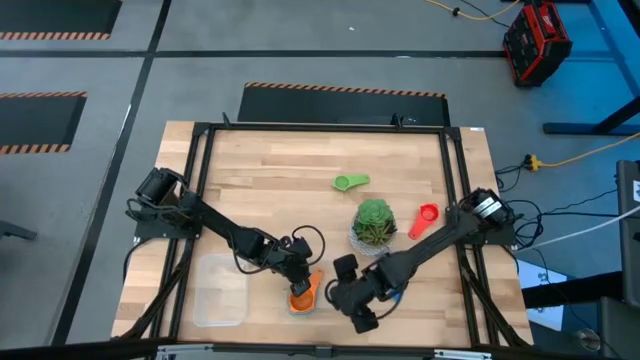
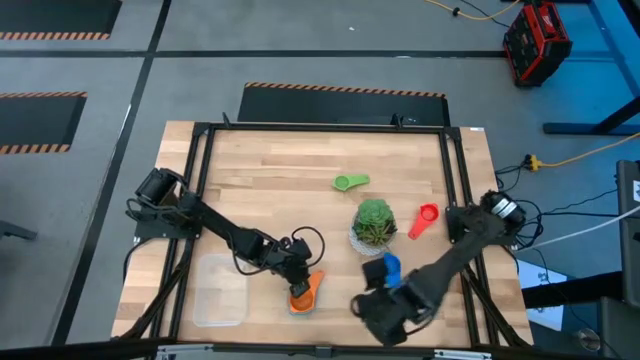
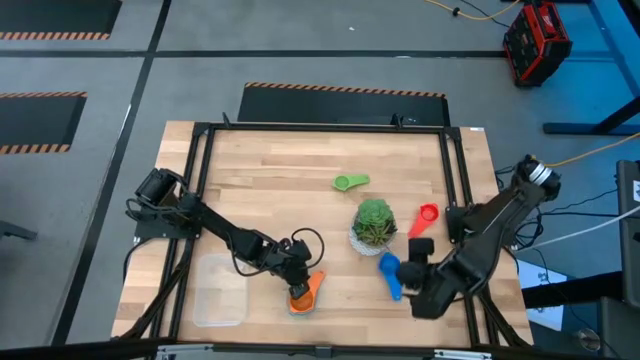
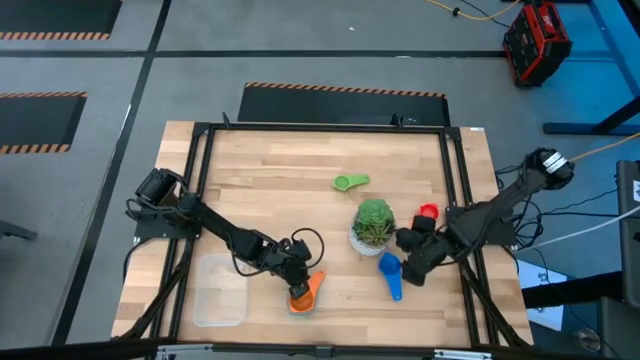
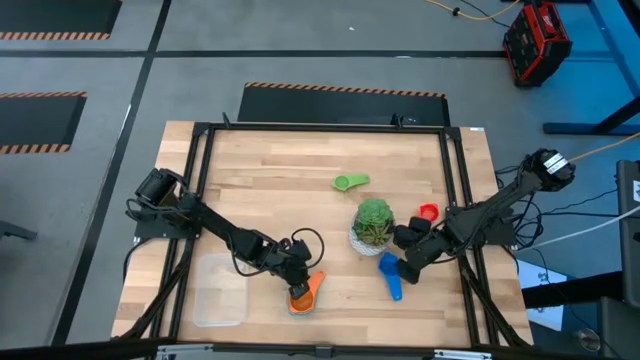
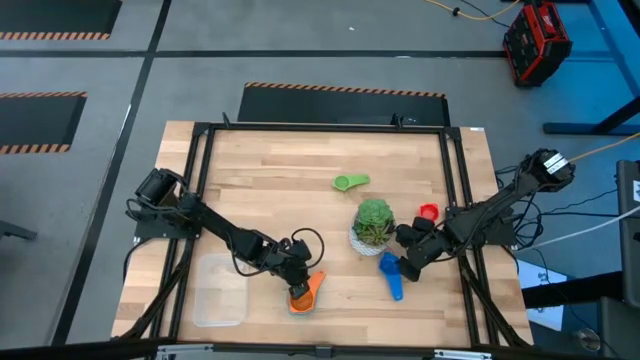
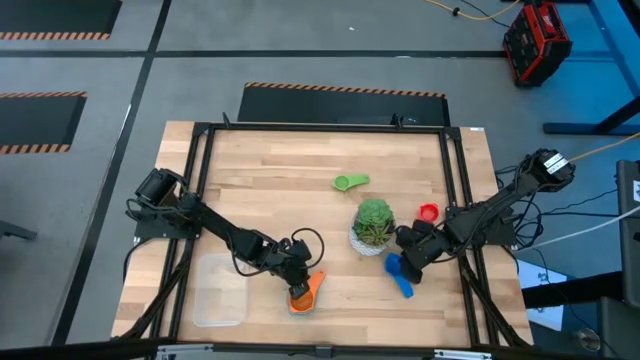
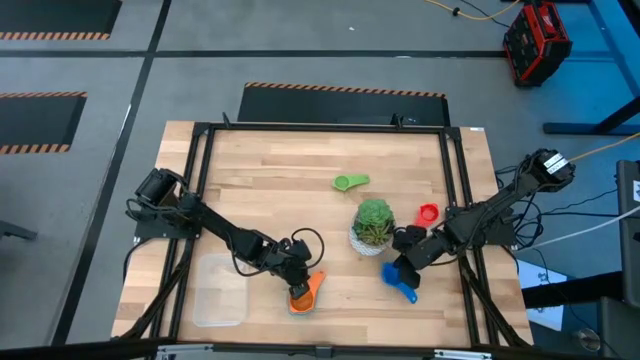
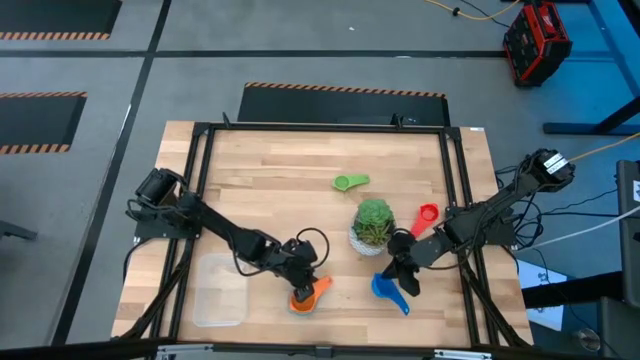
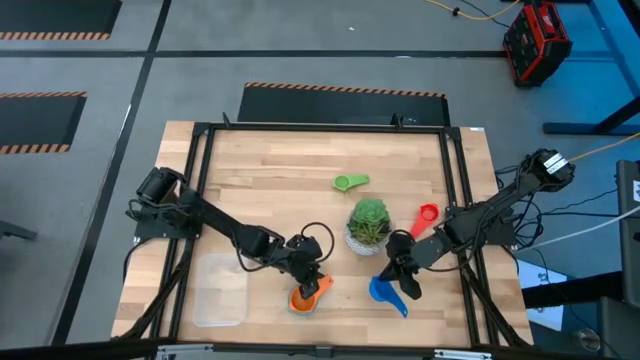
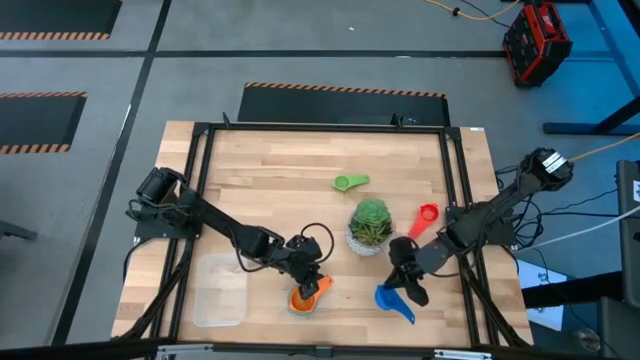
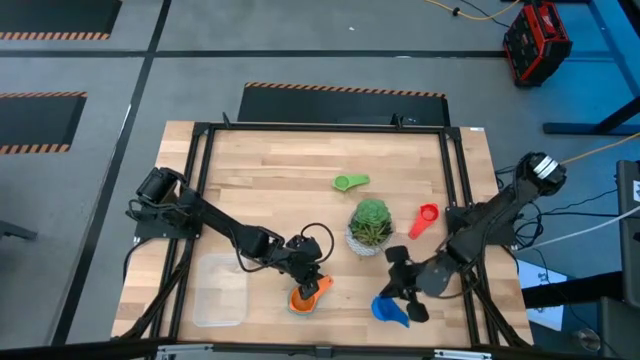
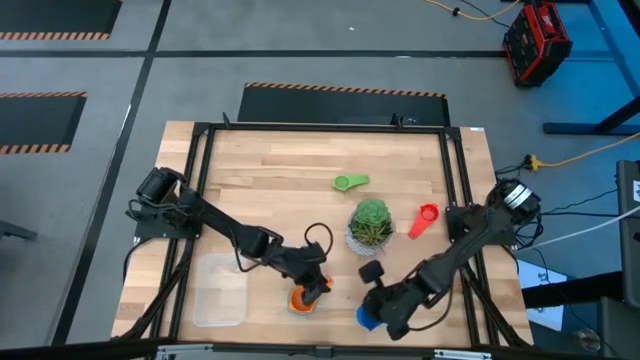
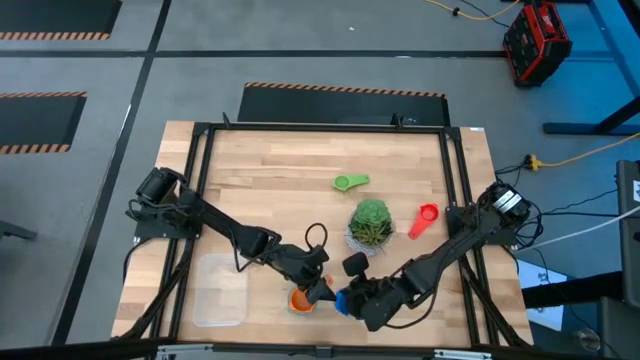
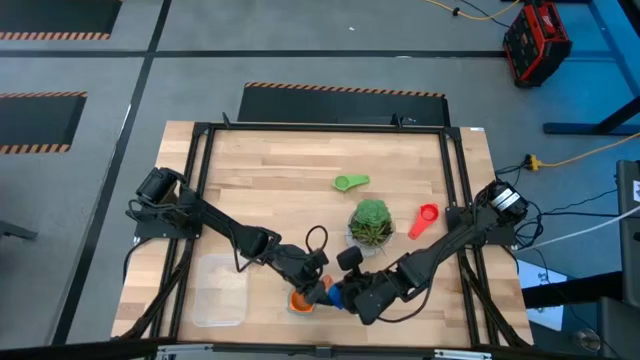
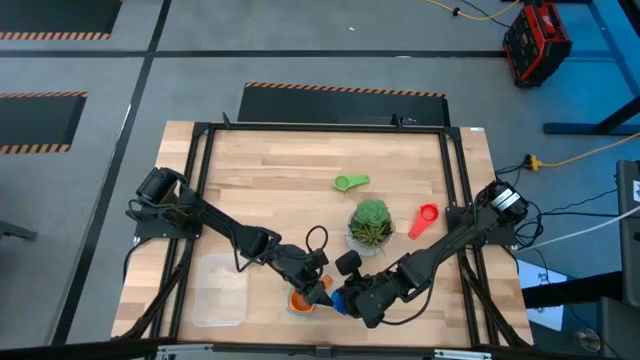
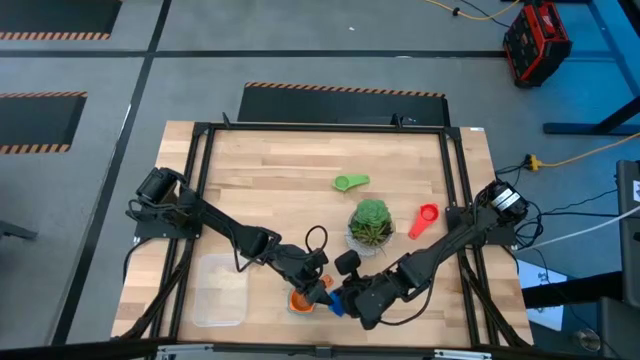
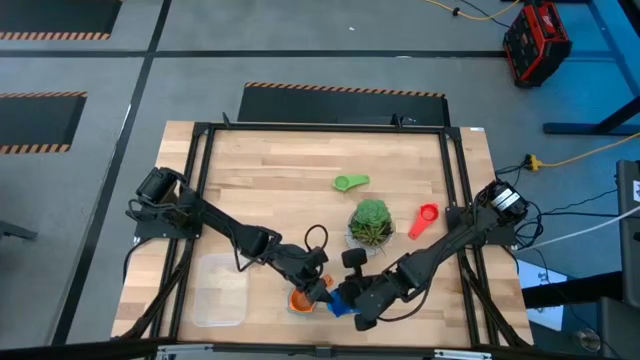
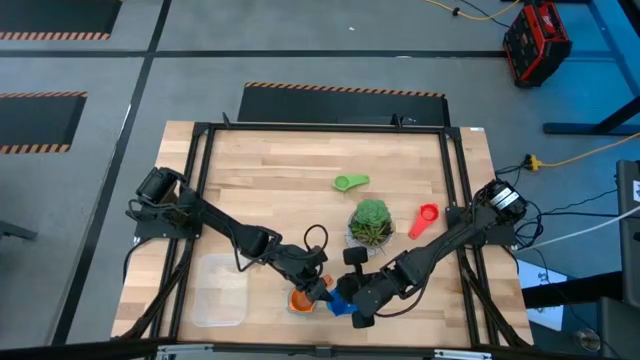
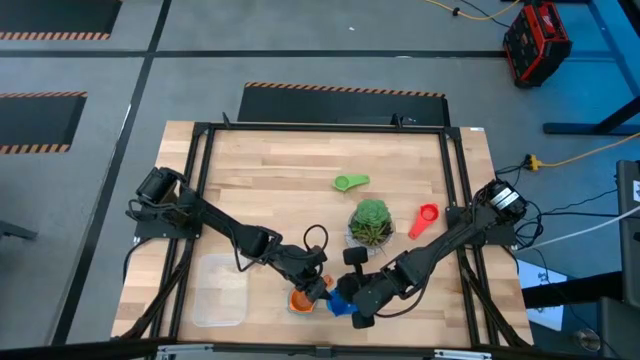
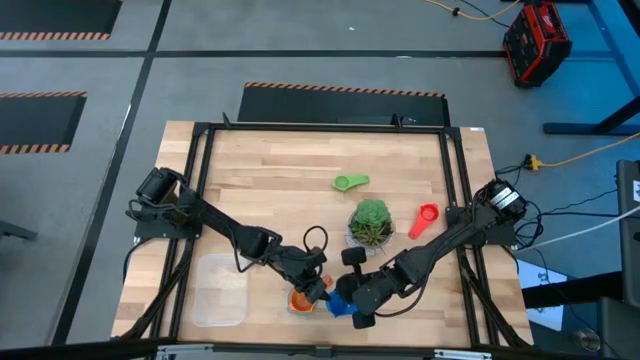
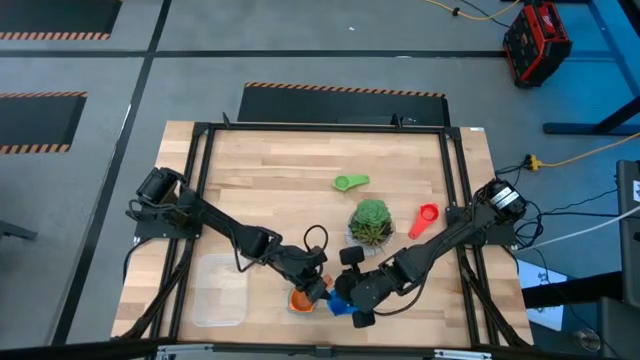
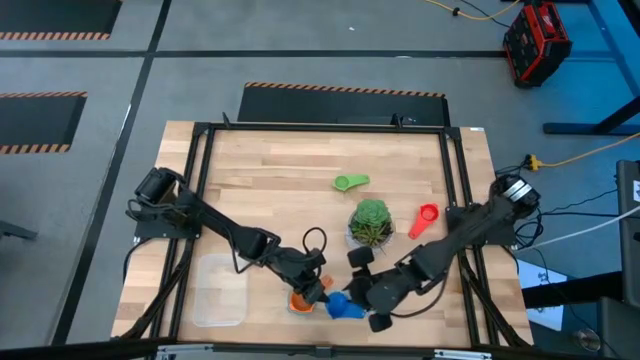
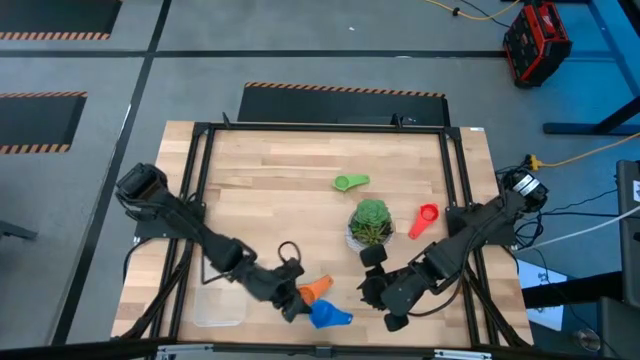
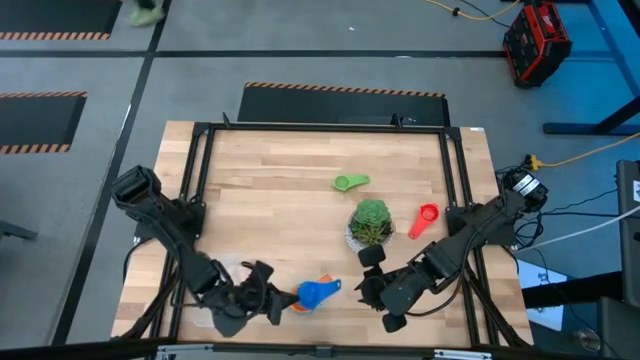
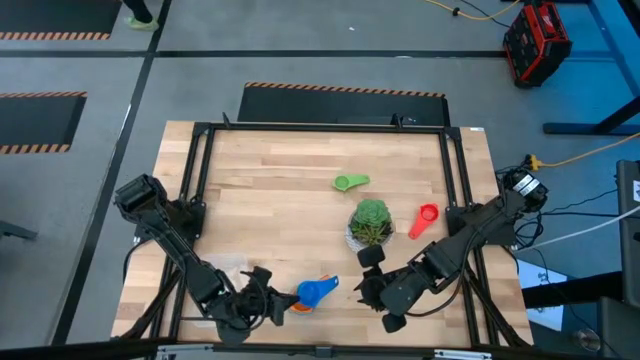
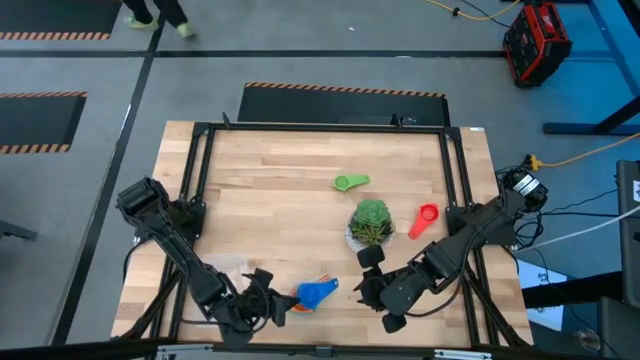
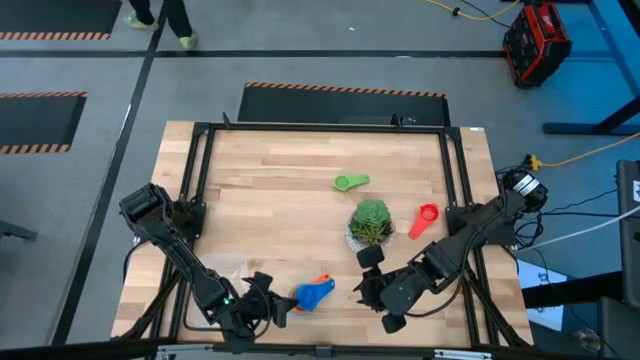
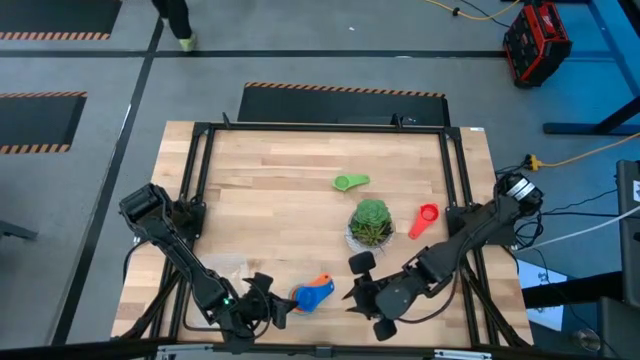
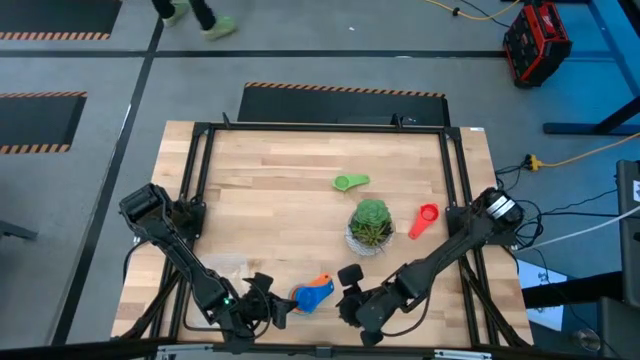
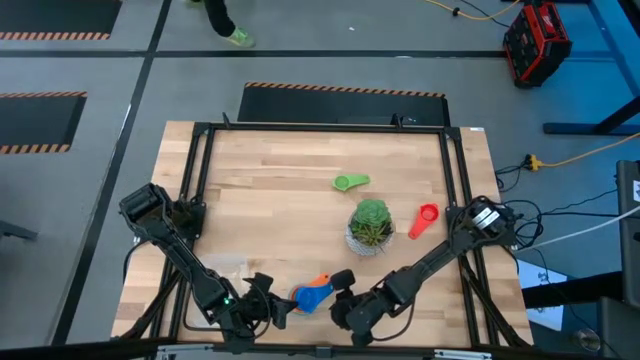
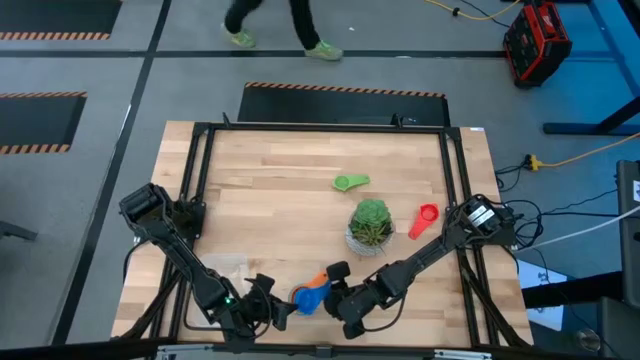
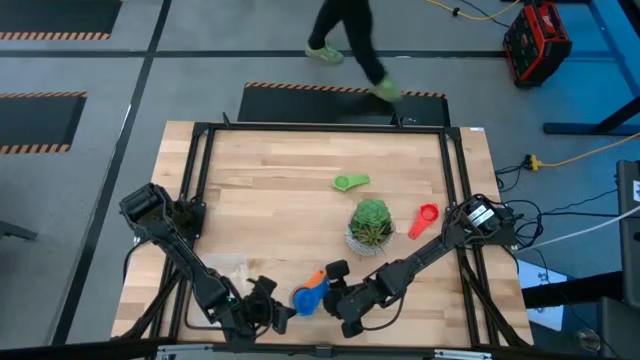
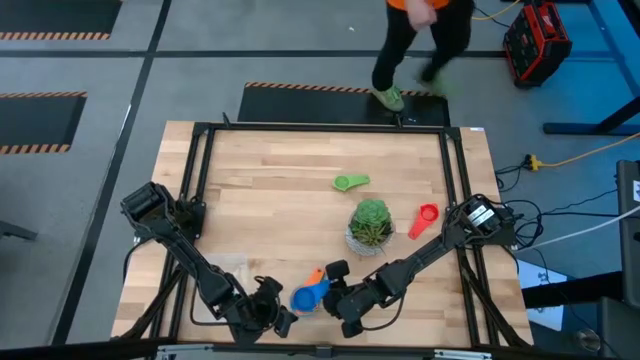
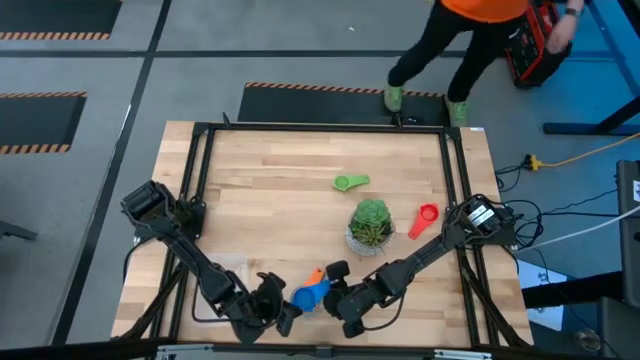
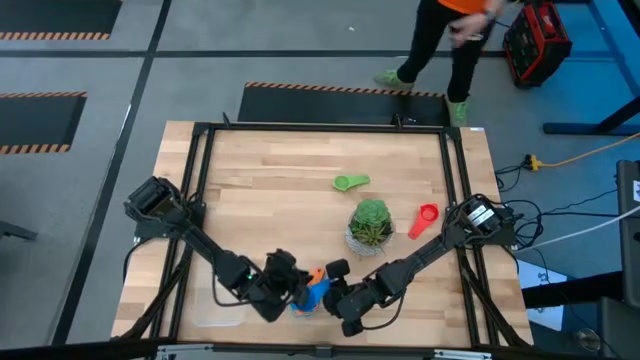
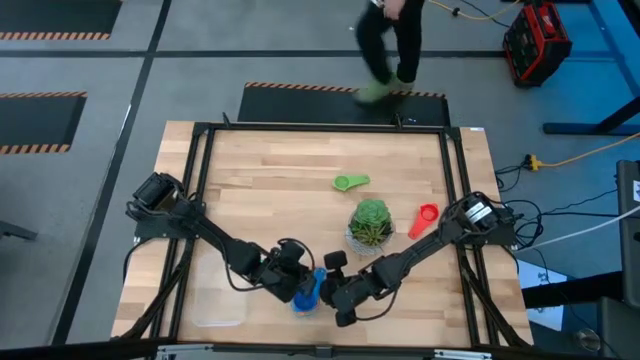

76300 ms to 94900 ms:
Task: Nest measuring cups in basket
Stack the blue measuring cup on top of the orange measuring cup

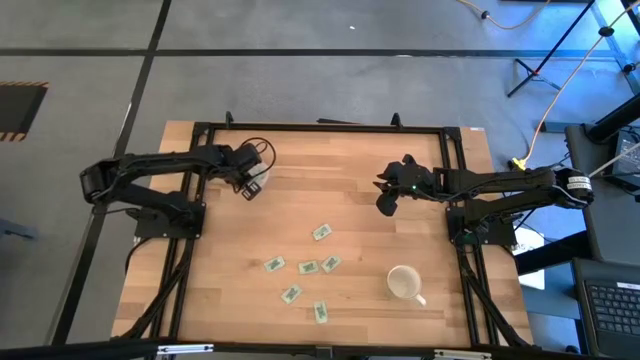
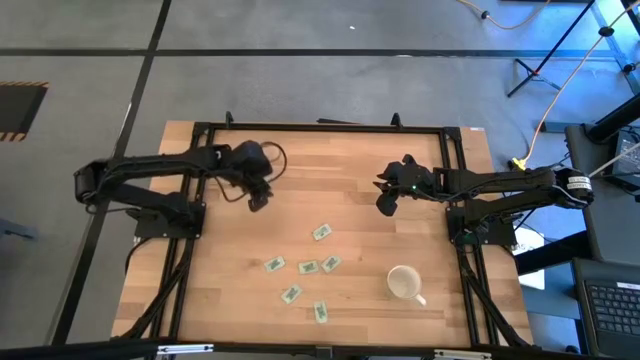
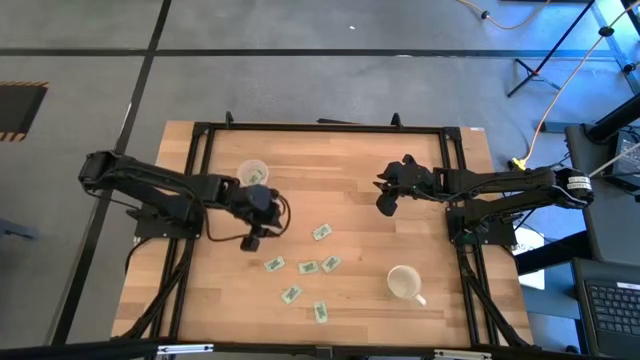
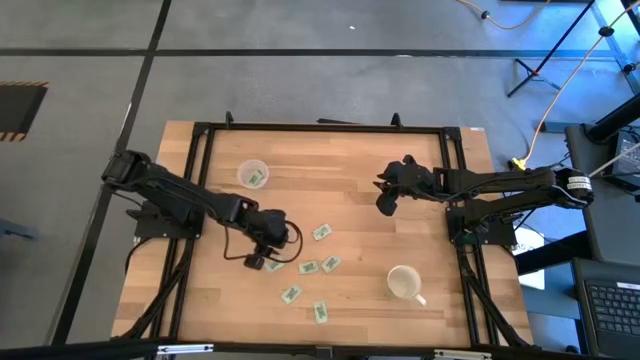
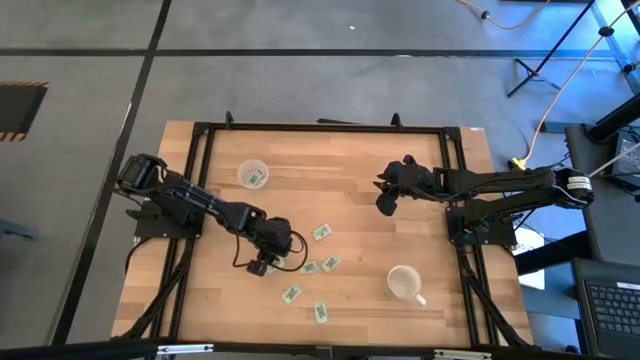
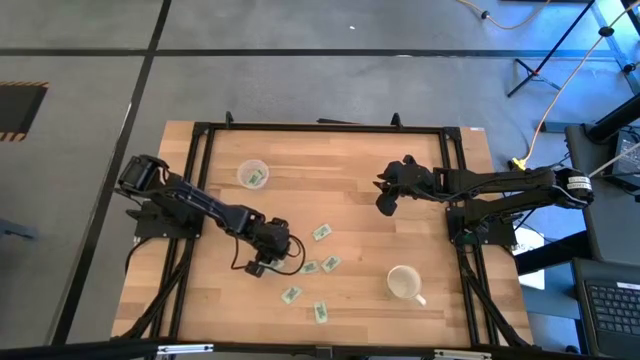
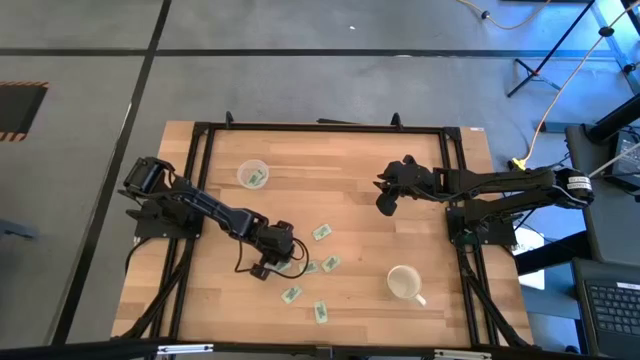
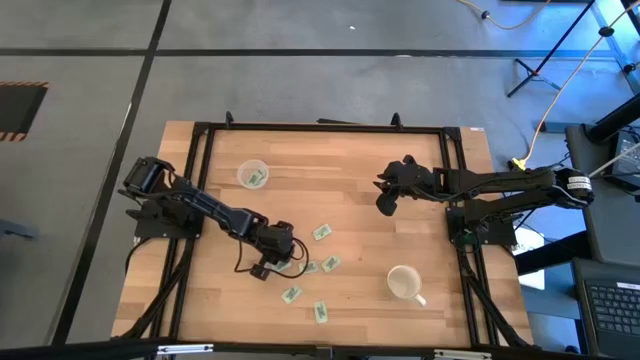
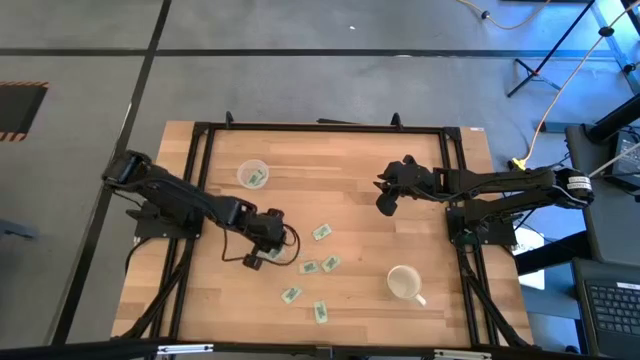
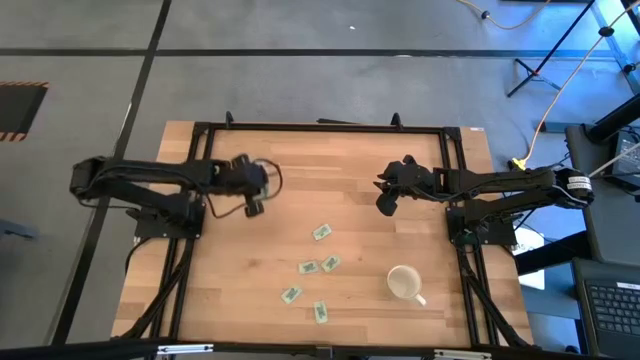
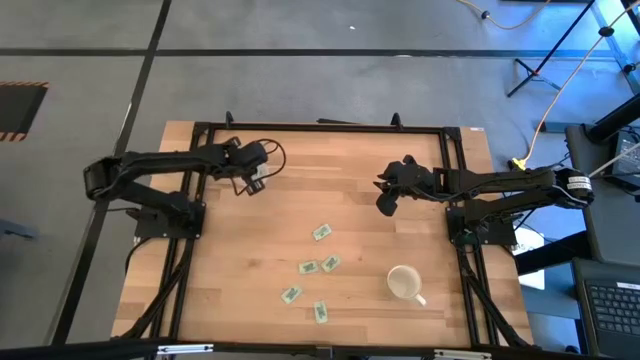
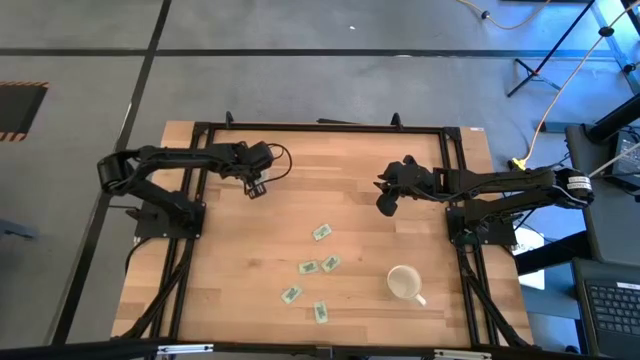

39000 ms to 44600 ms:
Task: Pick and place Stevia / Truvia into bins
Put the stevia packet into the left transparent container
